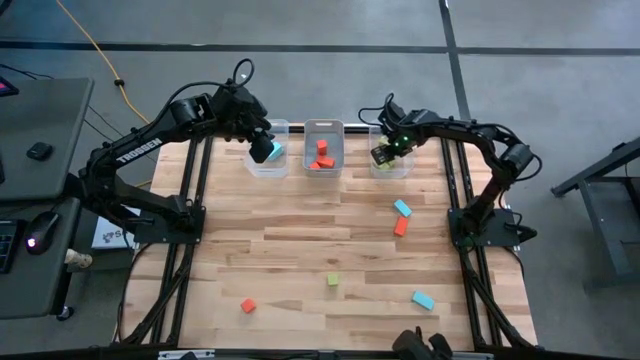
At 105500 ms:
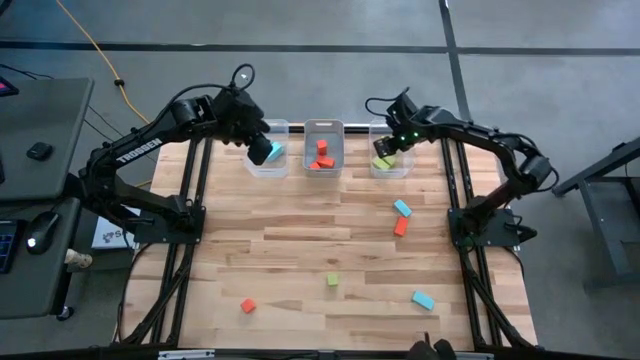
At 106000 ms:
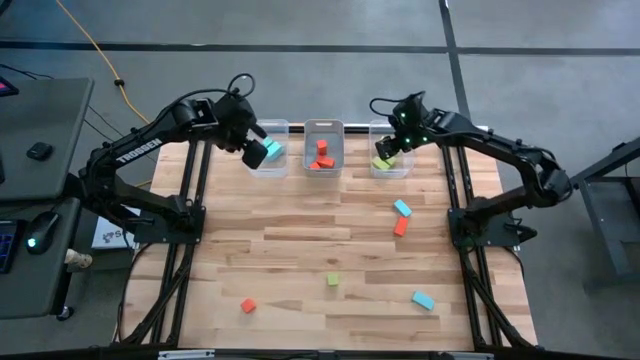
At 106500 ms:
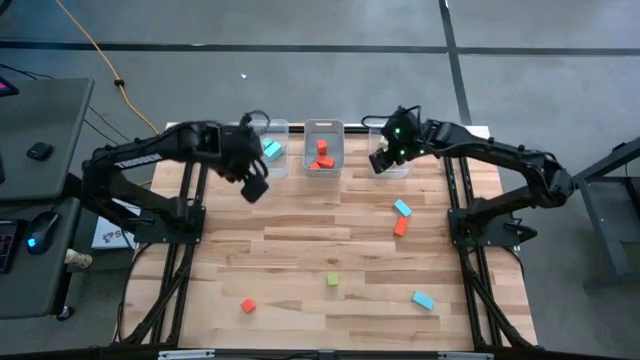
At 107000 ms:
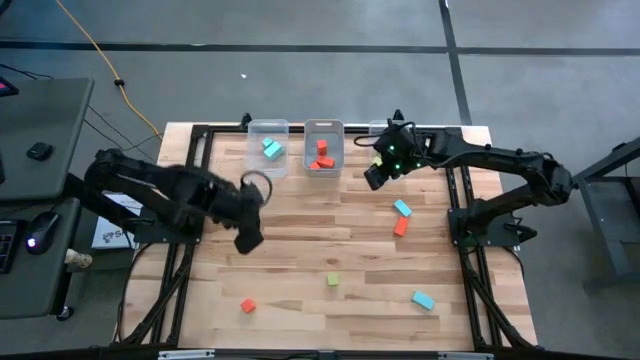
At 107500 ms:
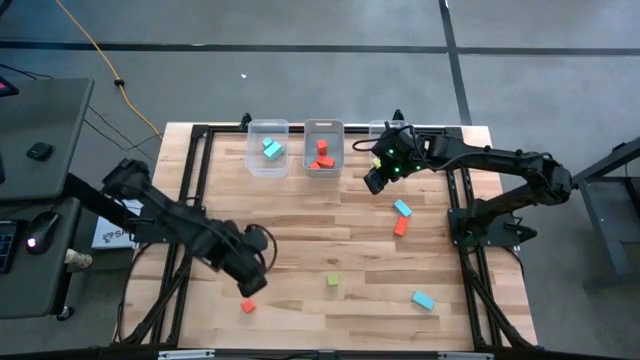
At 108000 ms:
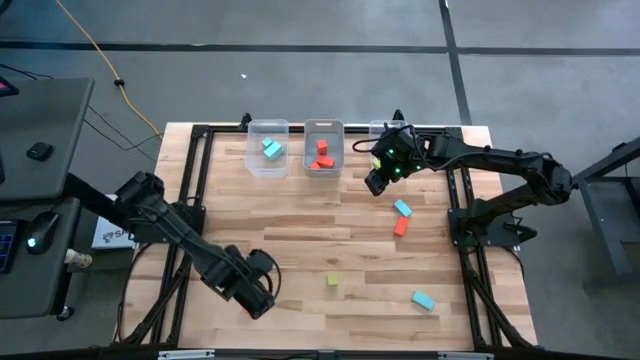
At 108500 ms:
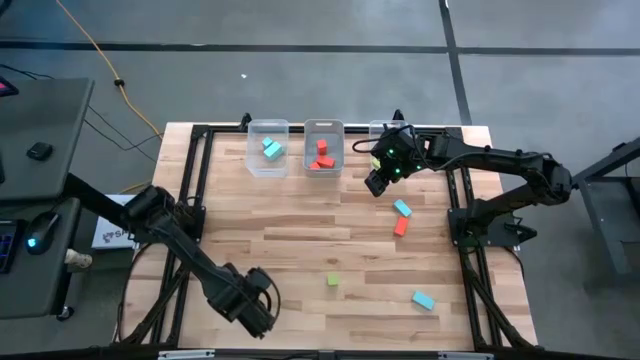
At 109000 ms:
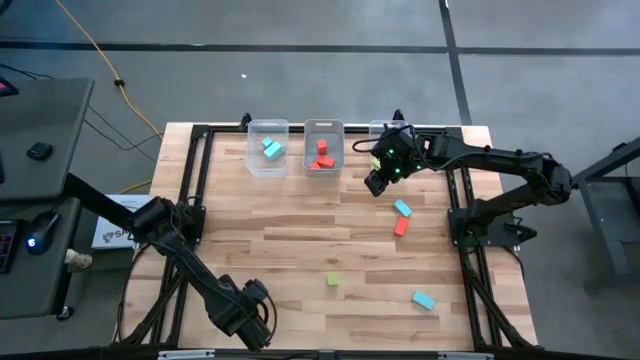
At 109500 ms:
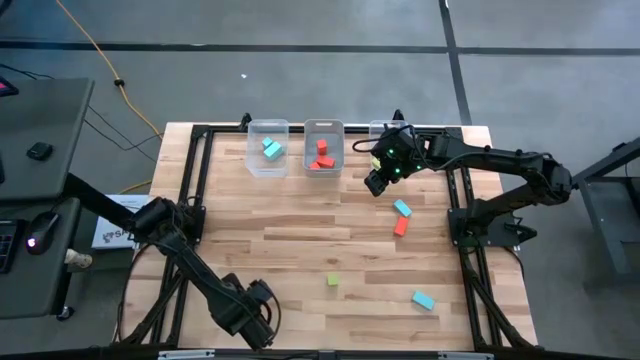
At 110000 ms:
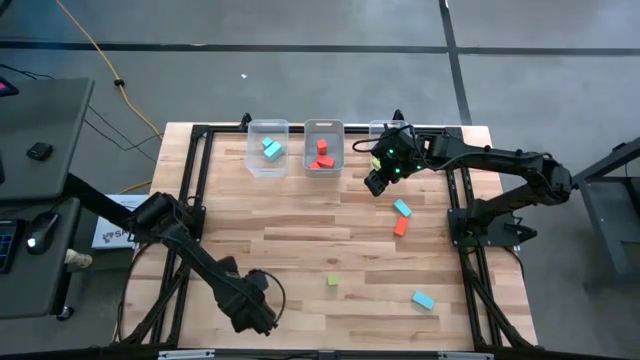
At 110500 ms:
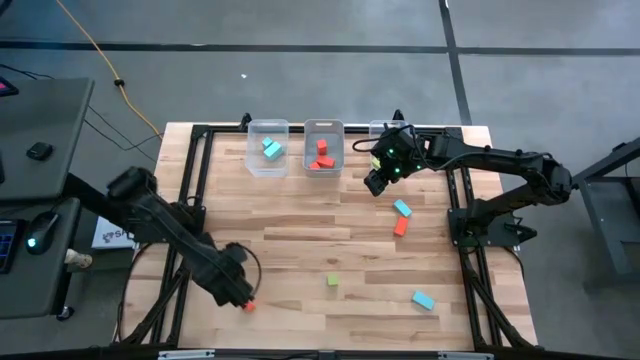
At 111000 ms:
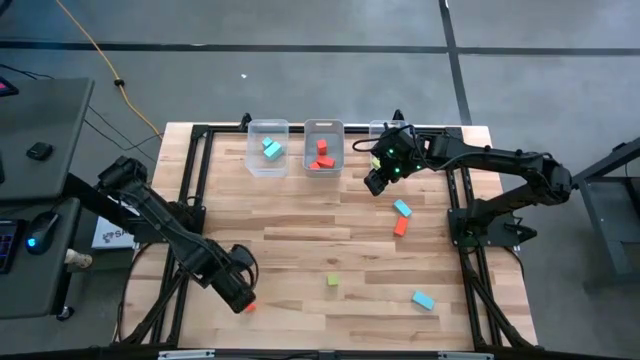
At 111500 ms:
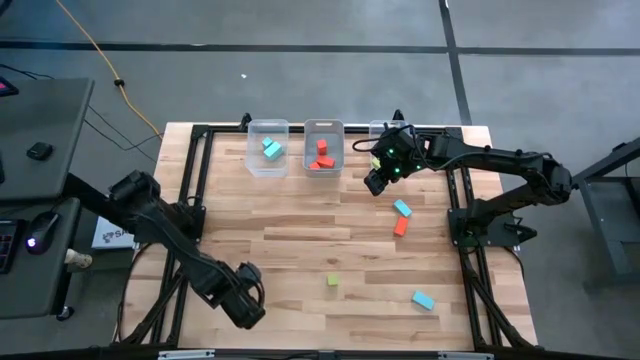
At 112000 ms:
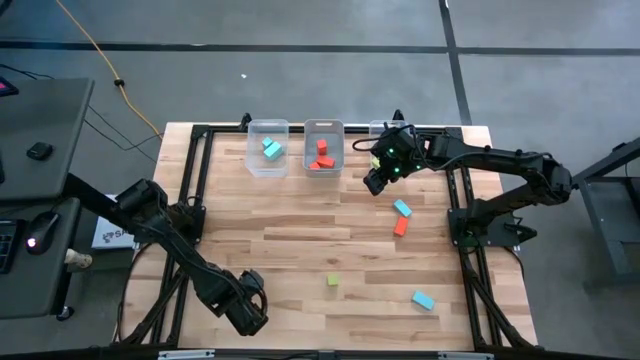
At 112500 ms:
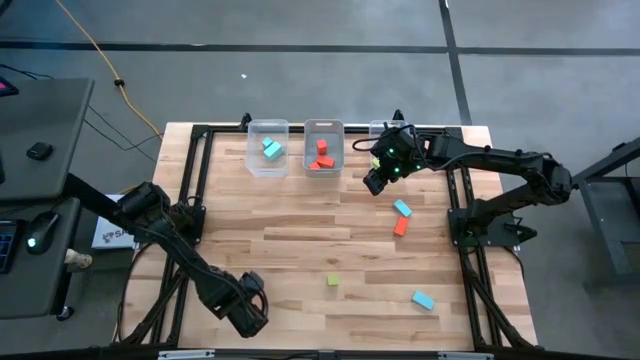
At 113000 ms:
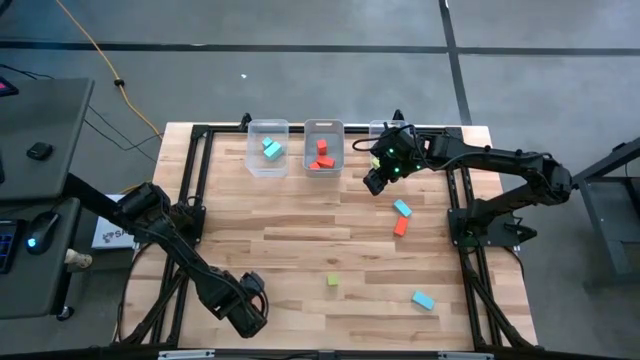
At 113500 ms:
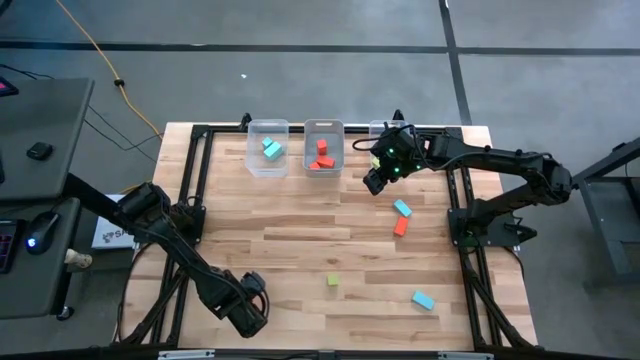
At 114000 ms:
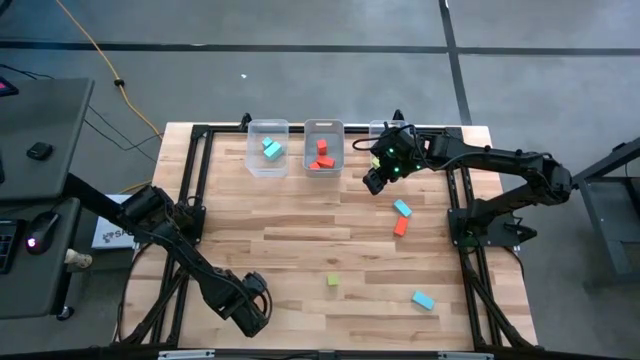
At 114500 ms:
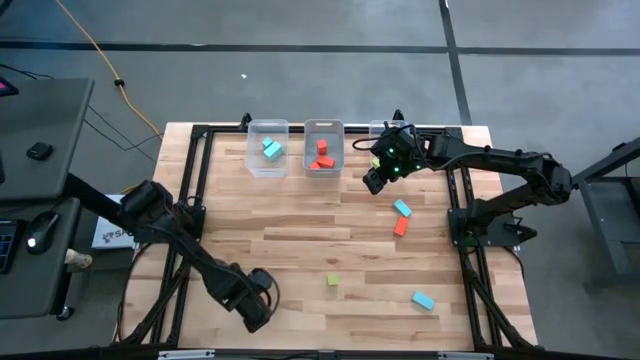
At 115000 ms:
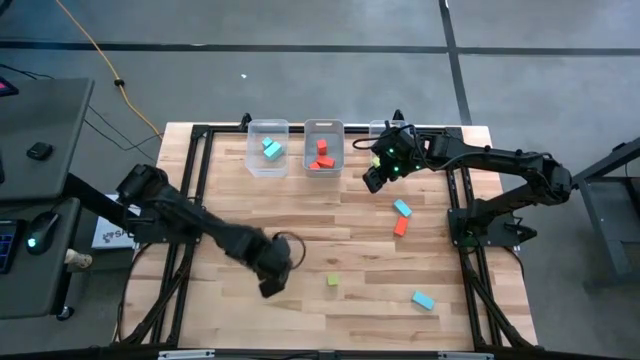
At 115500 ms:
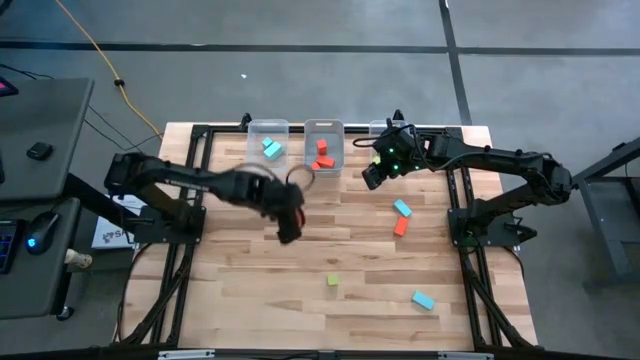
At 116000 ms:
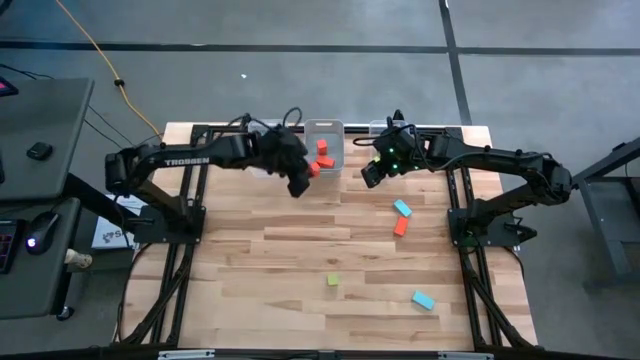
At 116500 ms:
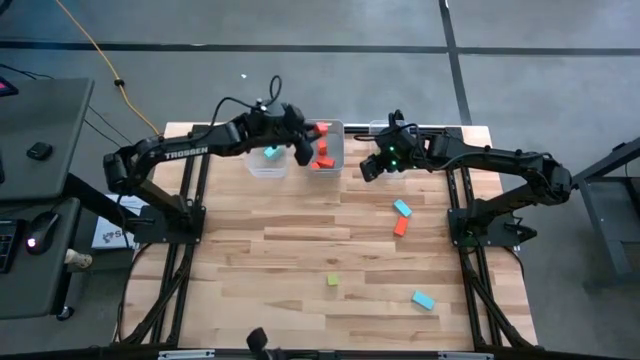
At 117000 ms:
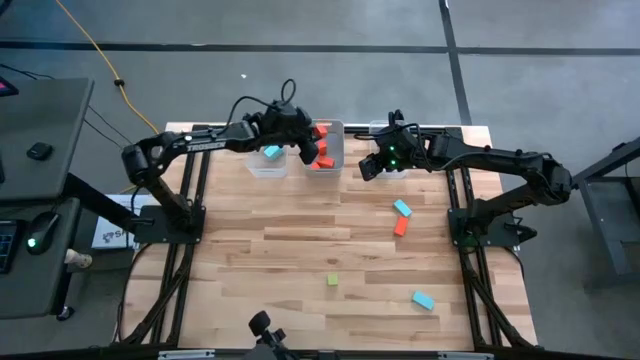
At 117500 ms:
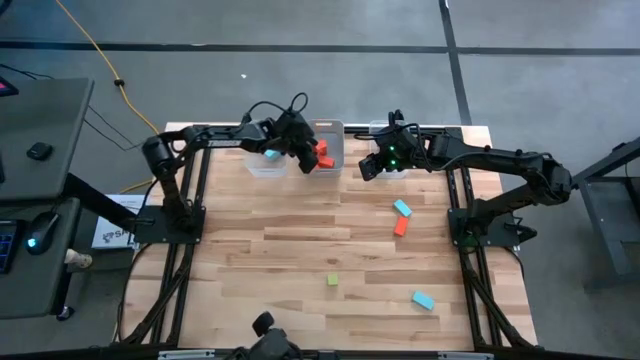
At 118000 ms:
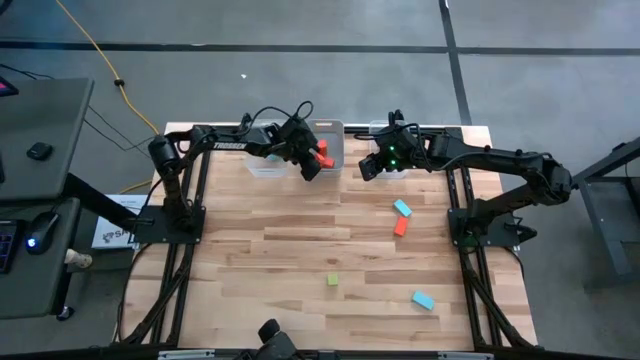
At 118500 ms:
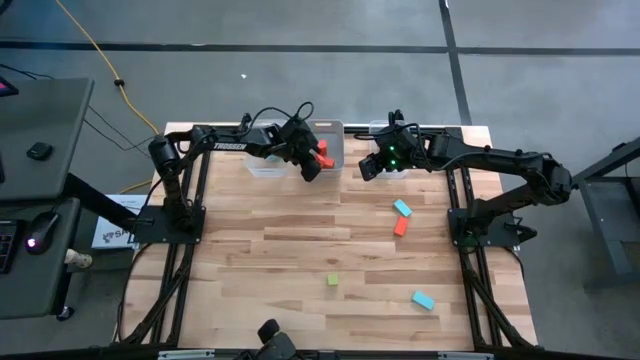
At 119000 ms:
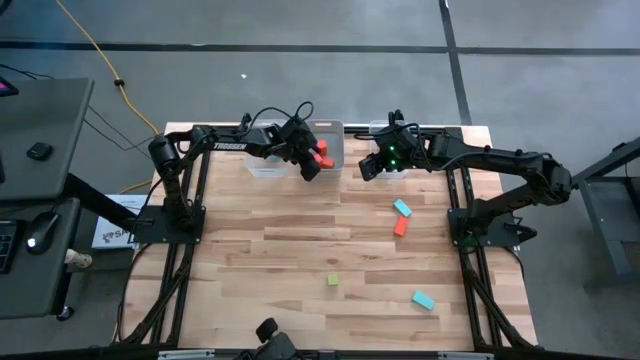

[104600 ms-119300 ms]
Task: Sort & place blocks by color
Put the orange cube block into the gray bin

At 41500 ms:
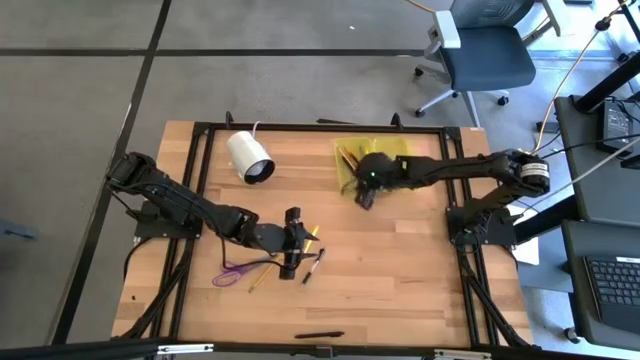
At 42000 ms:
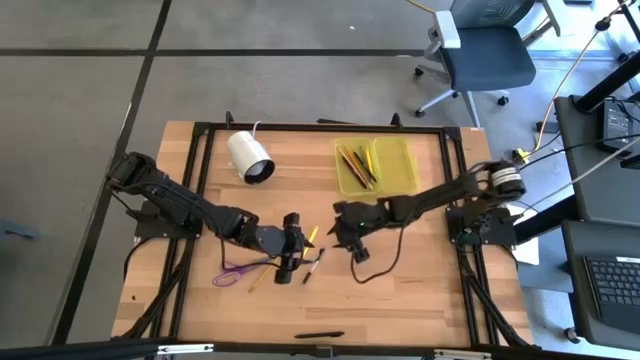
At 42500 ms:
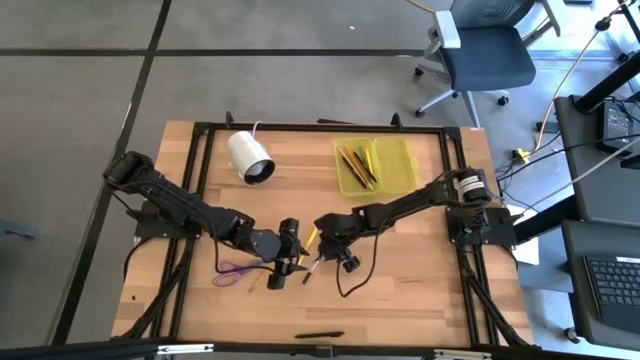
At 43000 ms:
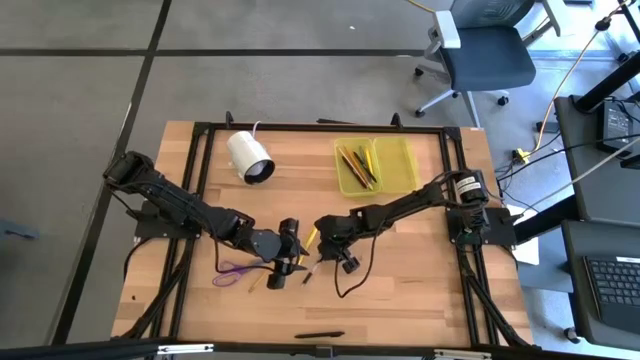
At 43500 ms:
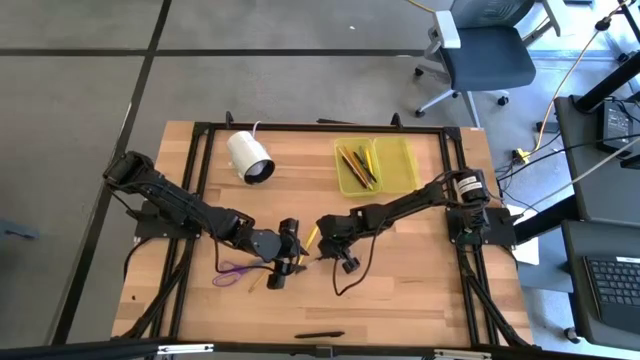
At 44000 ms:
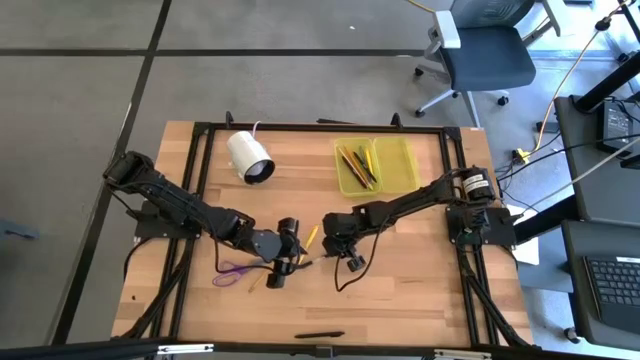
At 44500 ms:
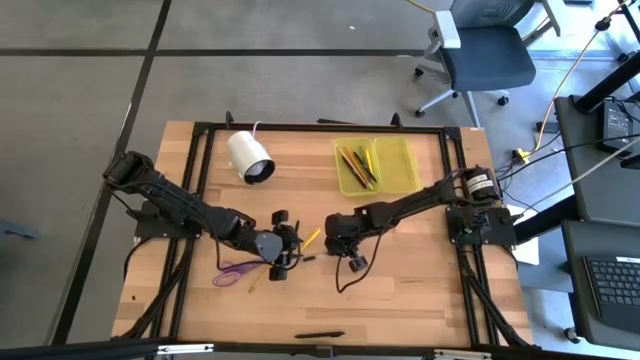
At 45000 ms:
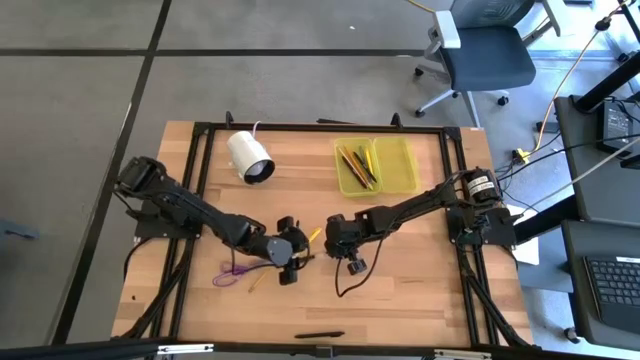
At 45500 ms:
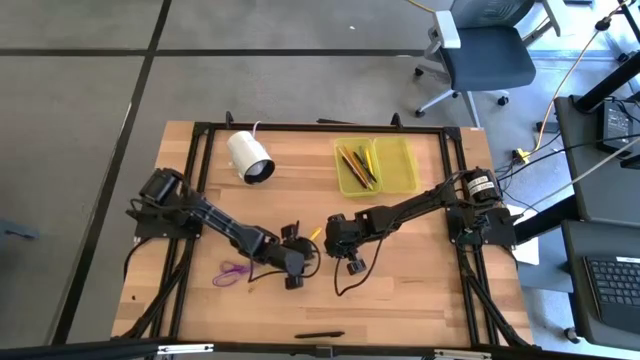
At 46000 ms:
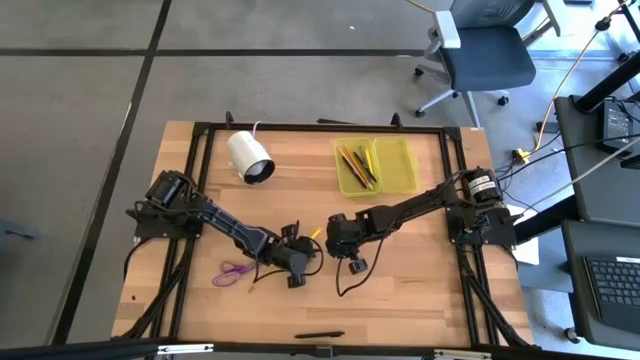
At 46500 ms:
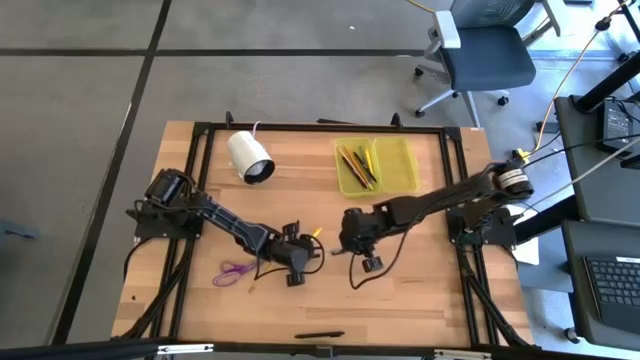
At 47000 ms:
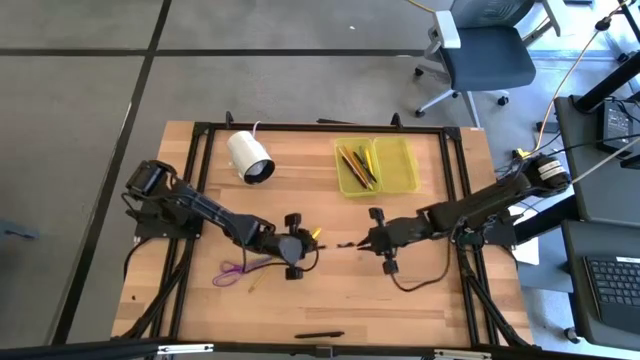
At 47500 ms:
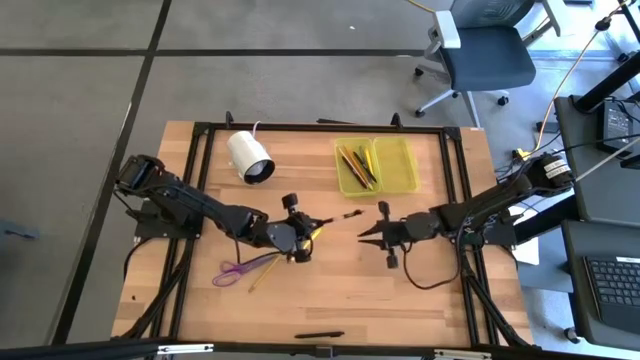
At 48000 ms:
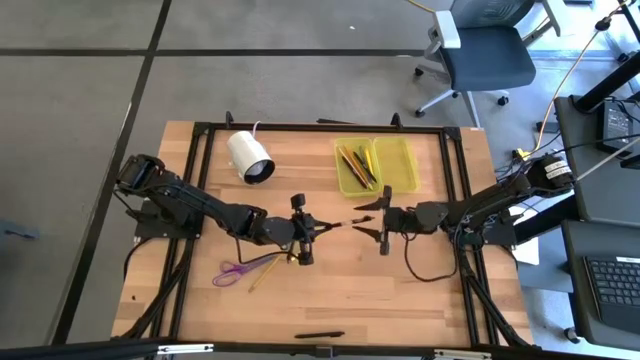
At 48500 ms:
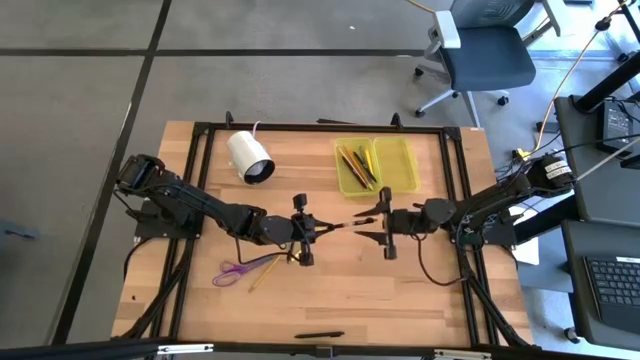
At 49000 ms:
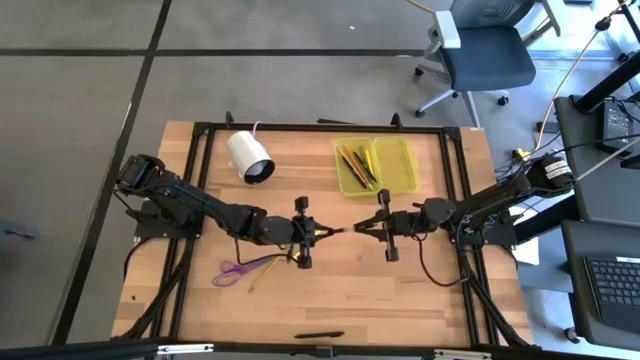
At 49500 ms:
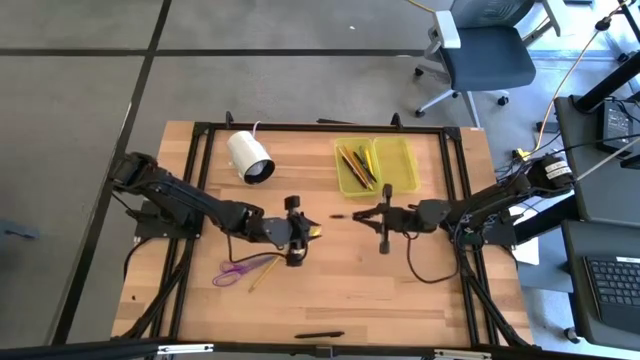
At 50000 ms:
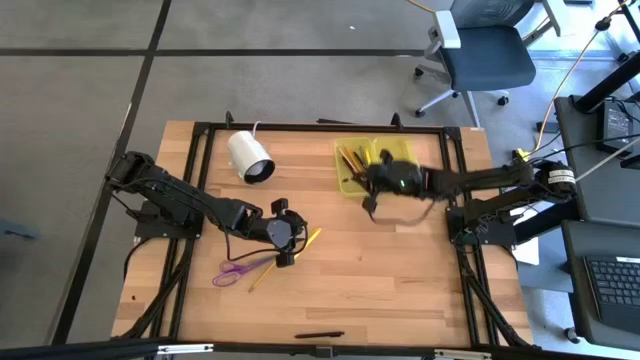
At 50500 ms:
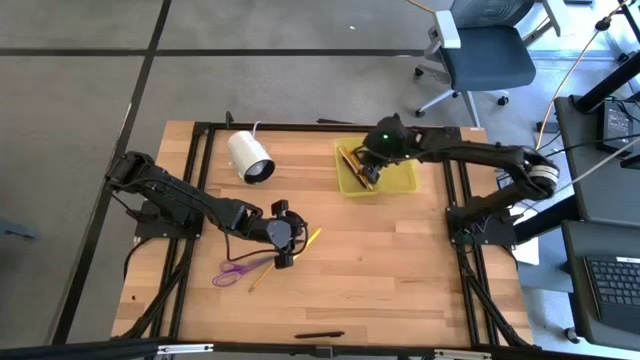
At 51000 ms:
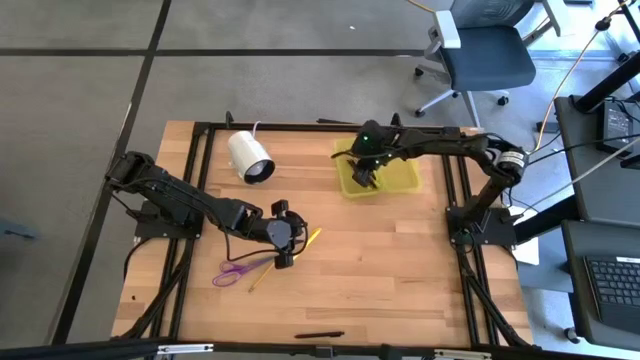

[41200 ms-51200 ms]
Task: Pick & place school supplies into a supply box
Put the black pen into the yellow supply box
